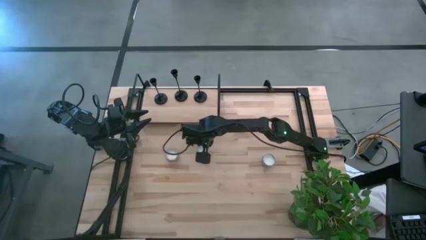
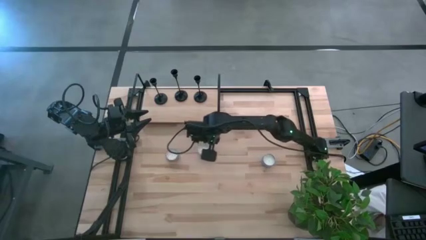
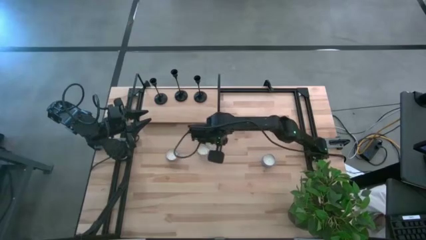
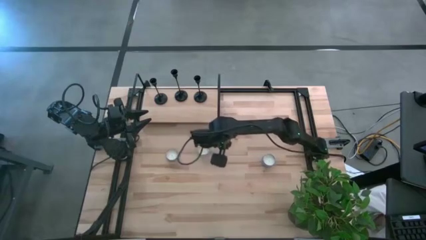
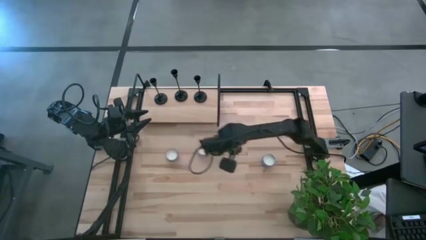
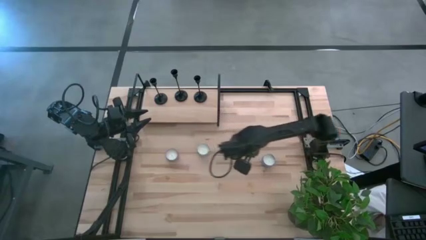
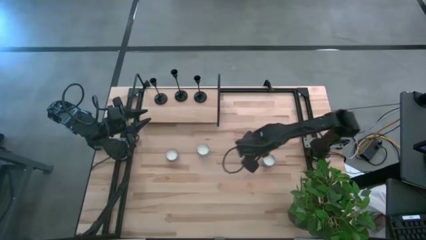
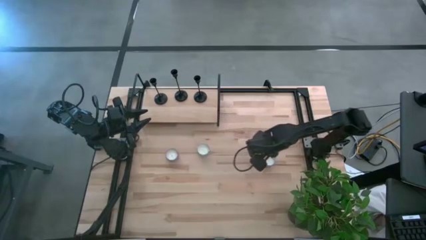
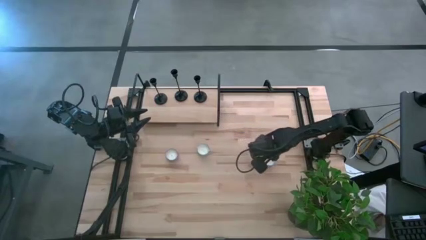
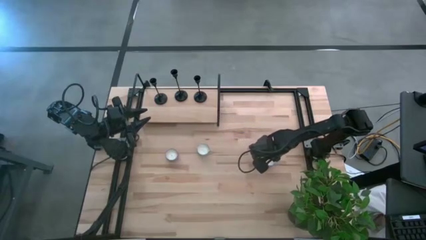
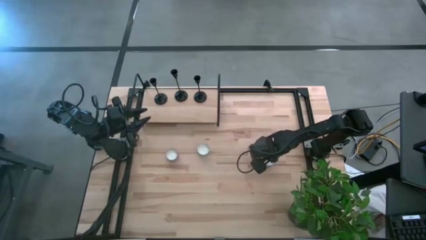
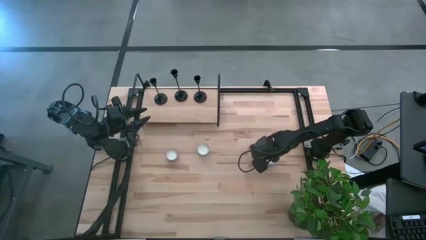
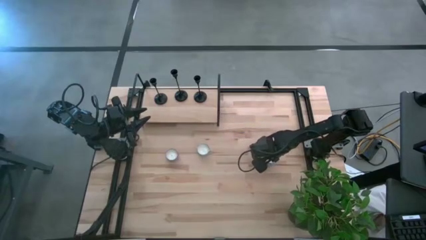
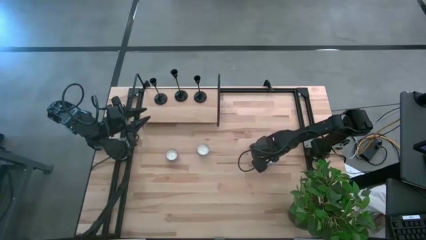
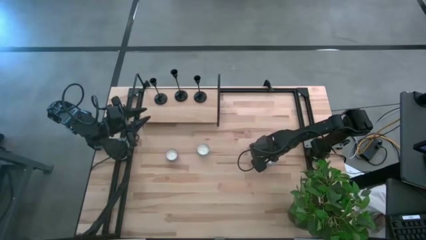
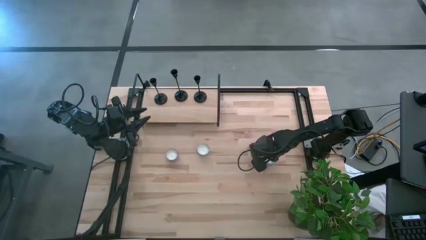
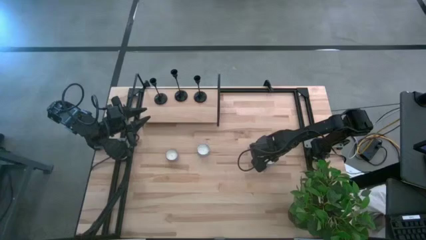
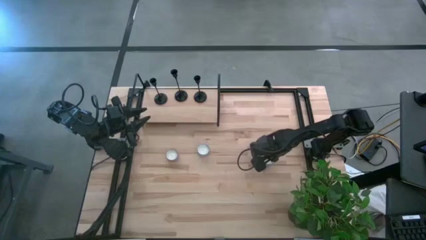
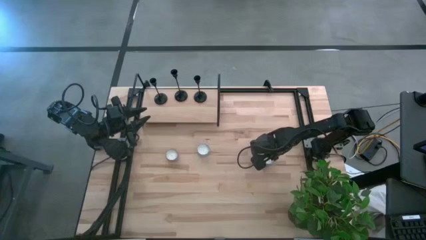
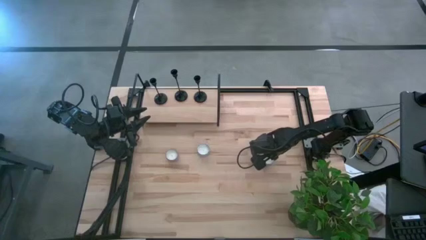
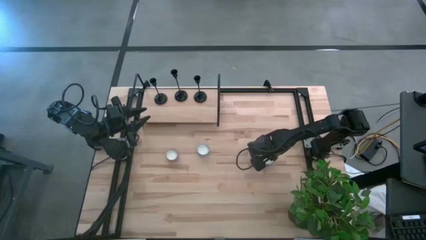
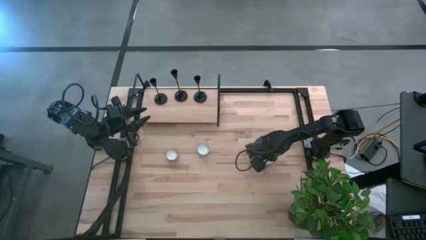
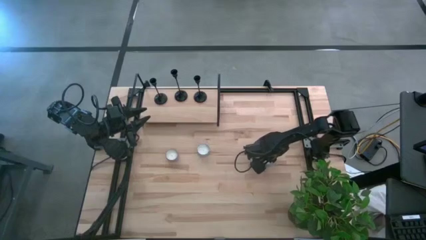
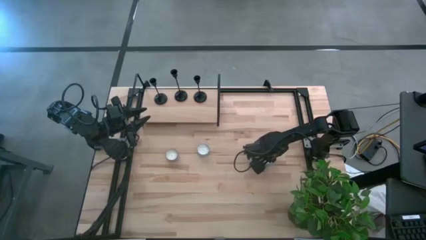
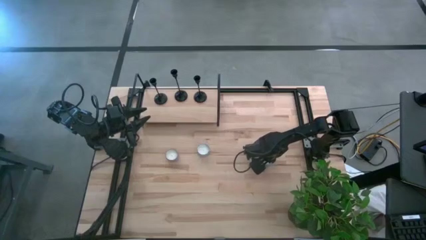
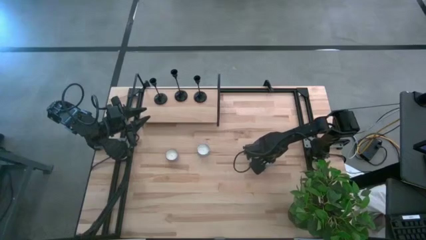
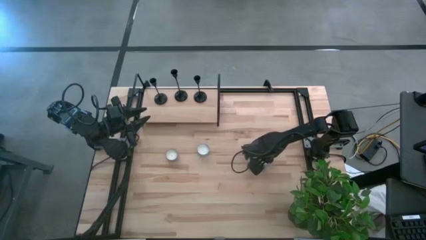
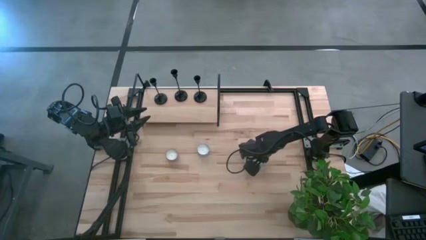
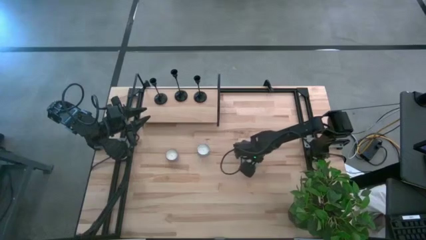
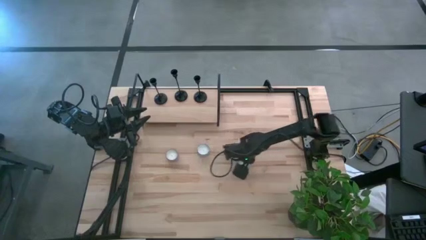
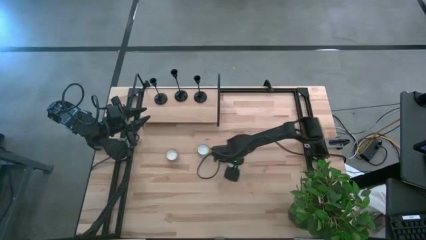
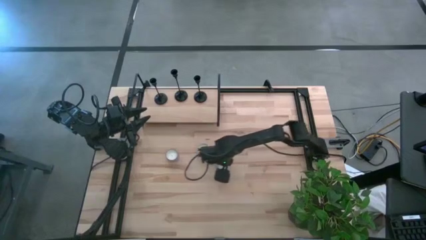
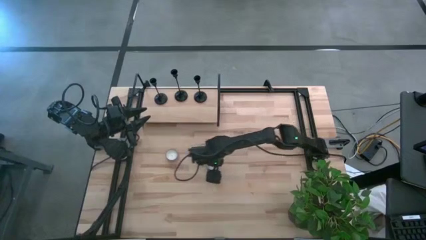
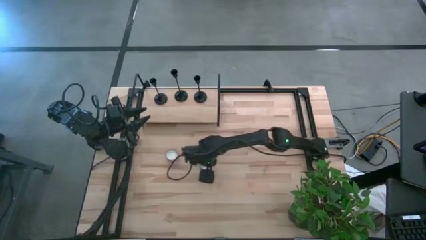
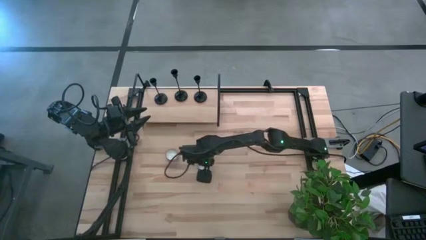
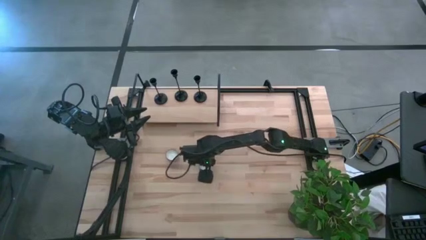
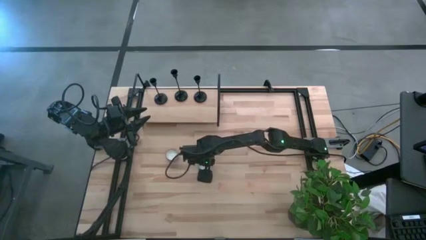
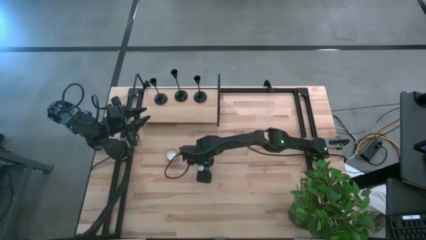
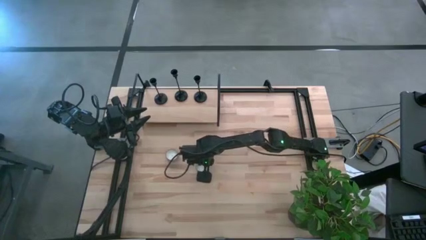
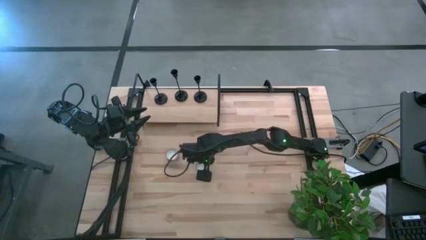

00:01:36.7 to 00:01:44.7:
Task: Pick & Place candle stick holders
Move the blue scented candle to the center of the table

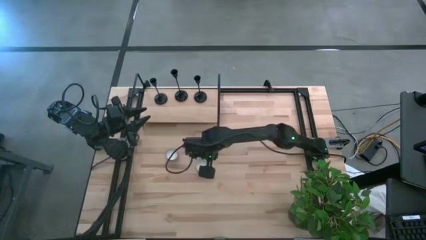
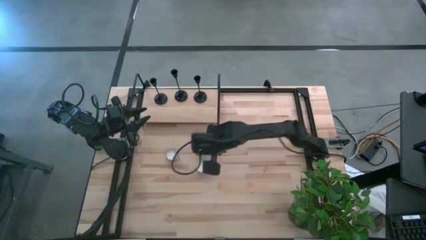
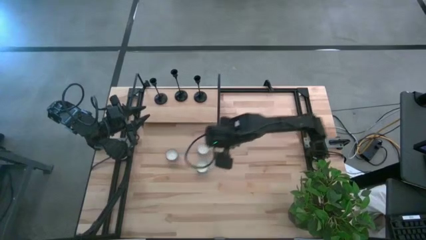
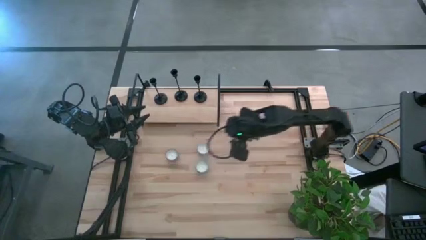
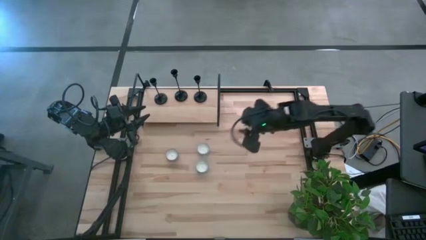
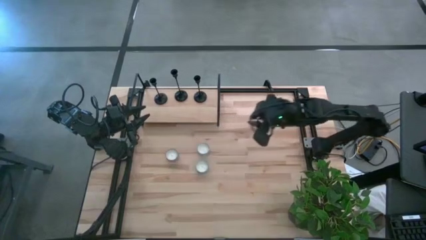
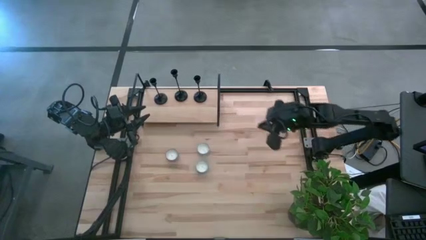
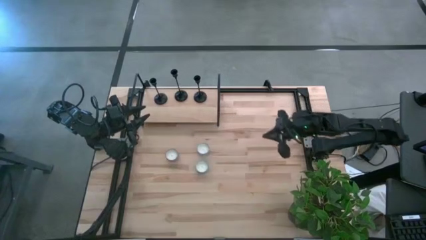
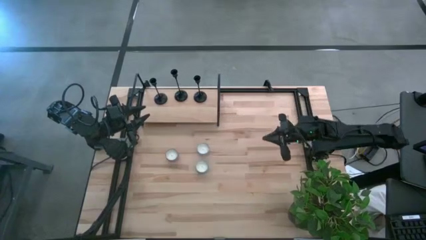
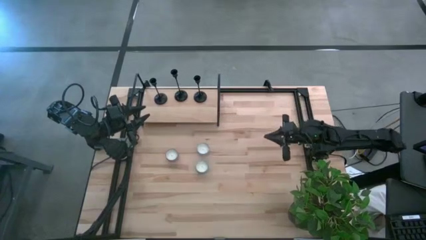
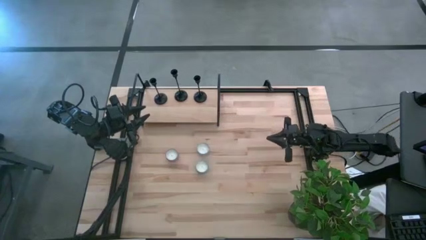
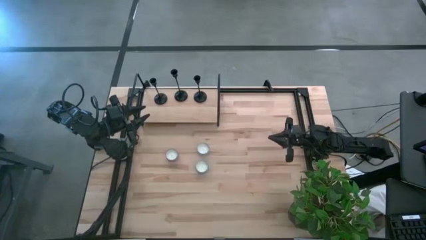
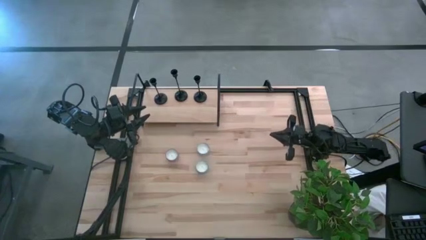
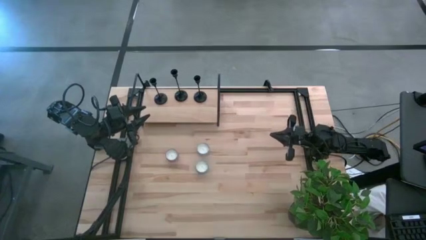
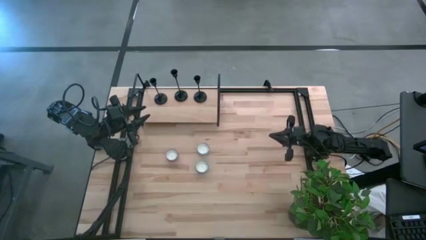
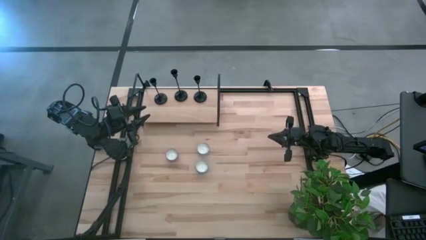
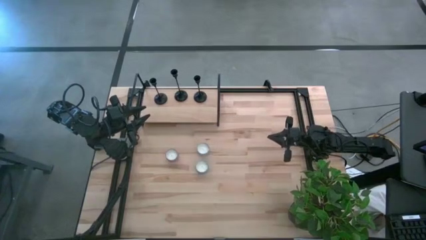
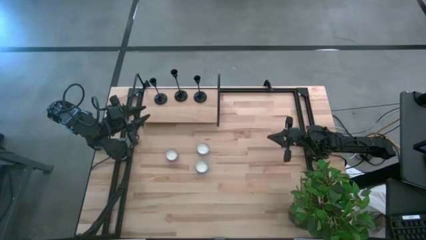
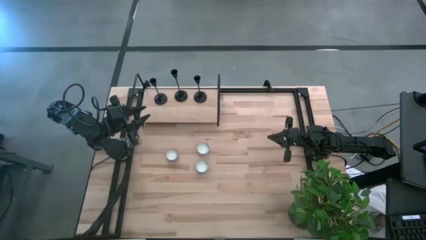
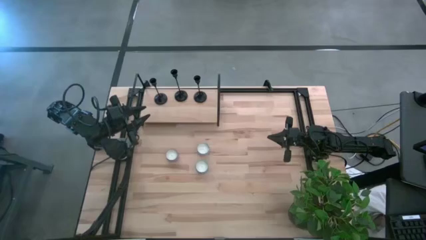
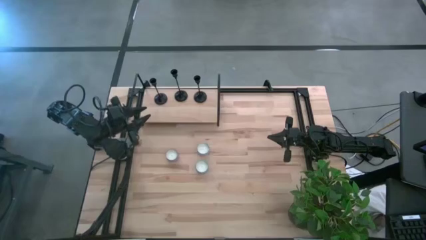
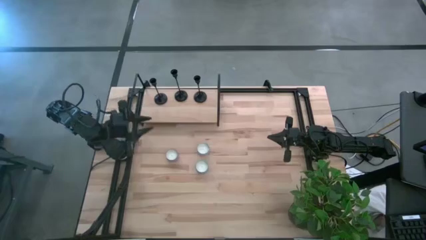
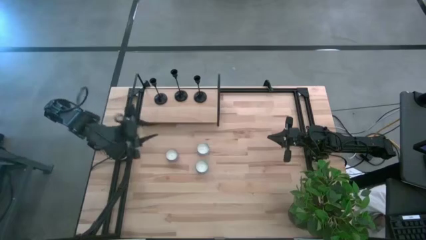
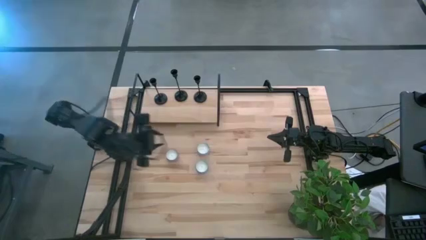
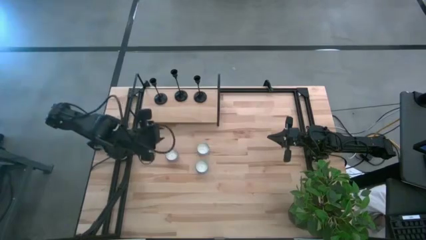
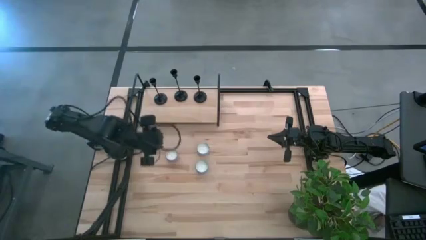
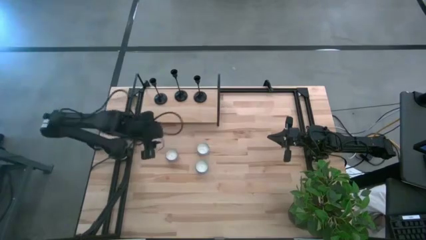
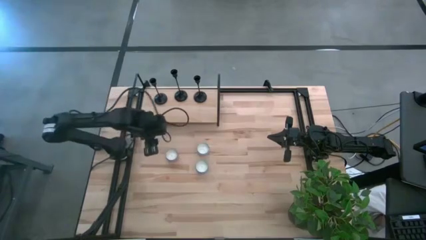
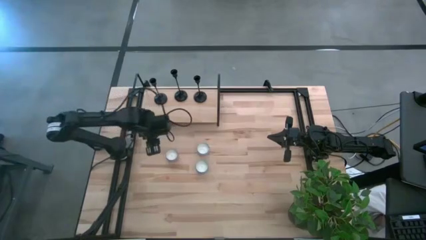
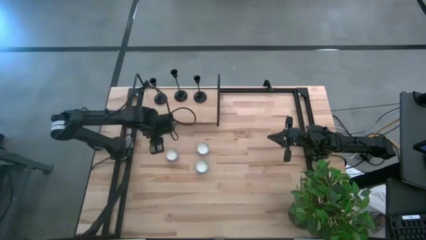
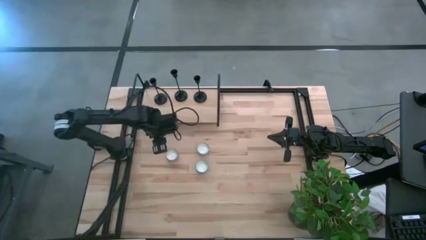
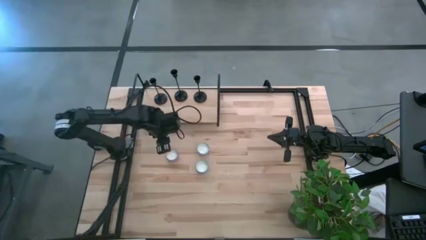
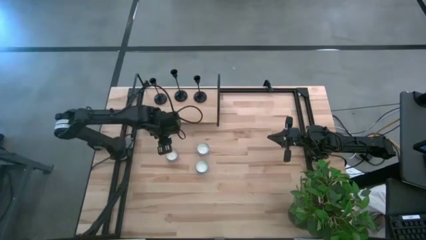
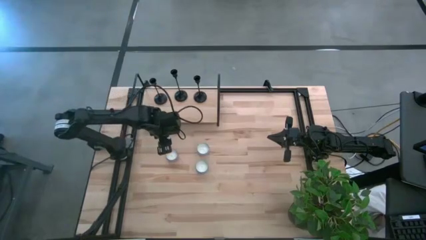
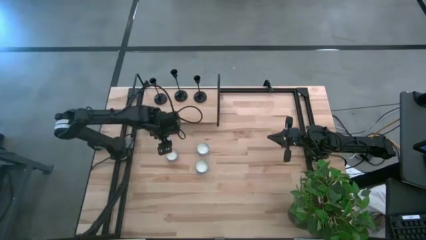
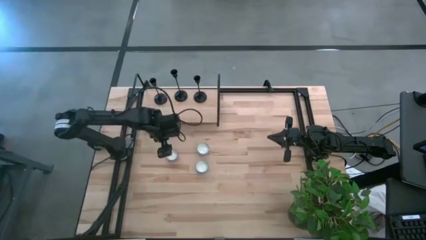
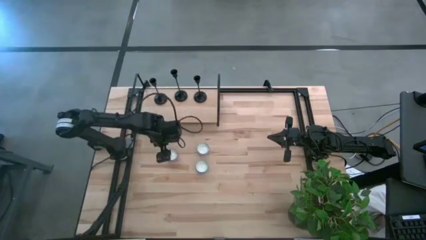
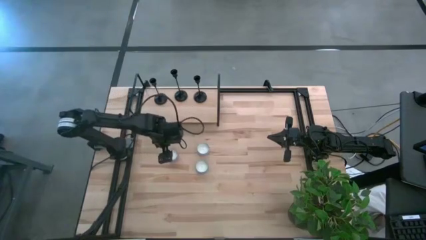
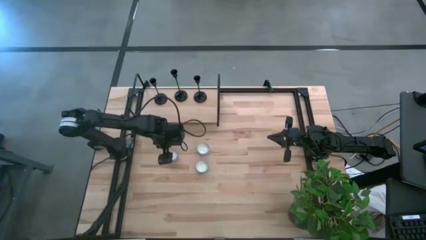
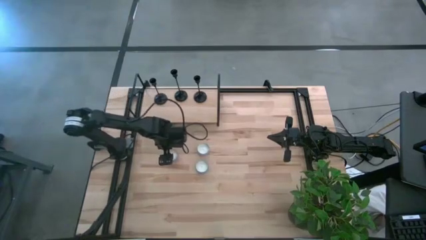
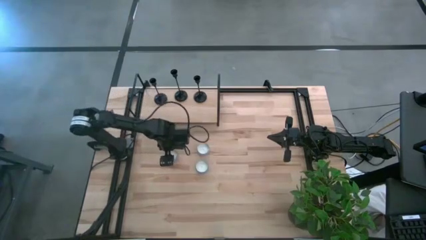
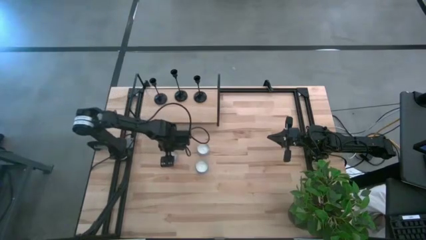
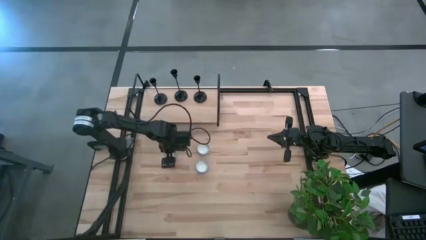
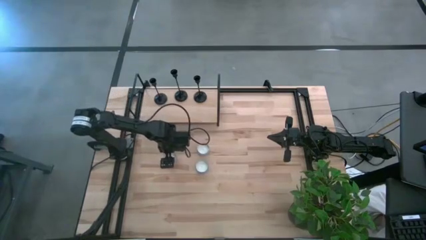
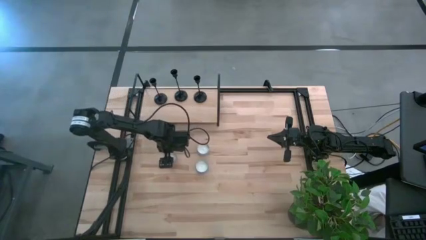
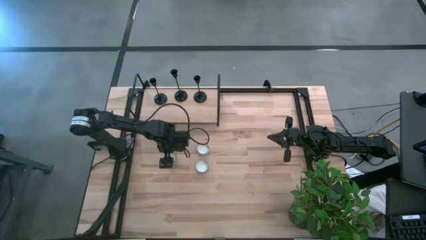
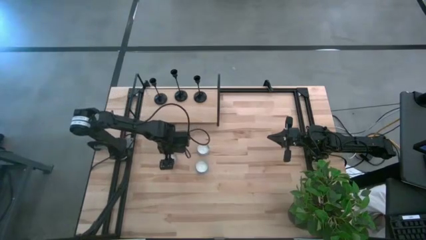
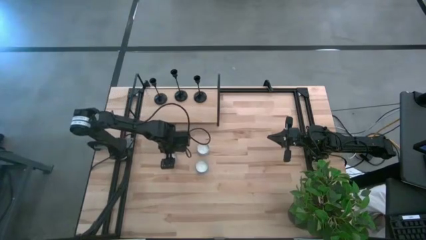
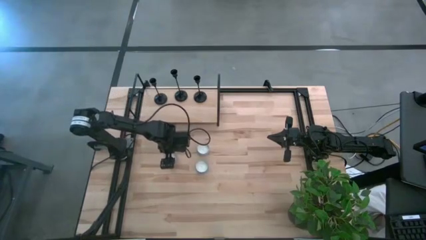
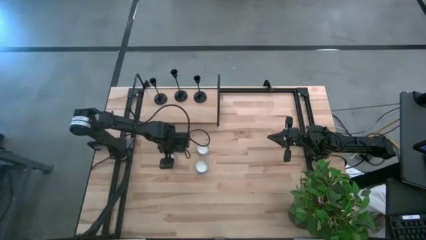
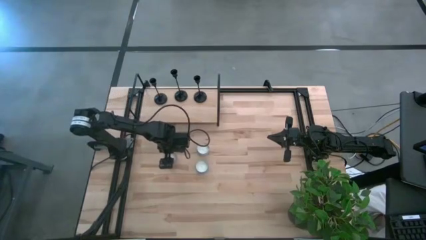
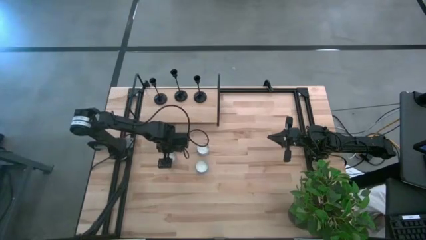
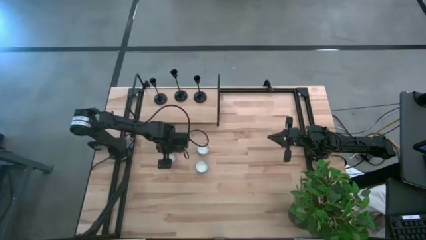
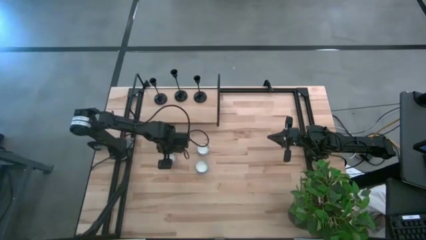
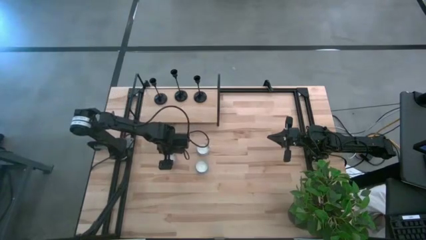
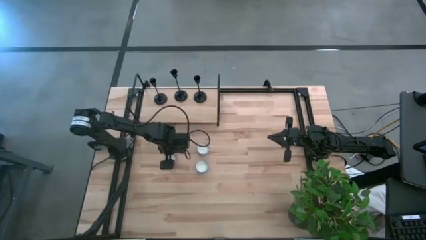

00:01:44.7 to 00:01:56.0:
Put the pink scented candle on the shelf
